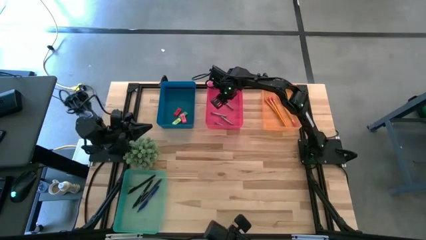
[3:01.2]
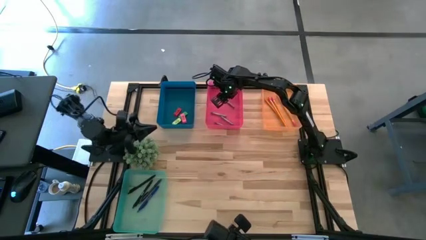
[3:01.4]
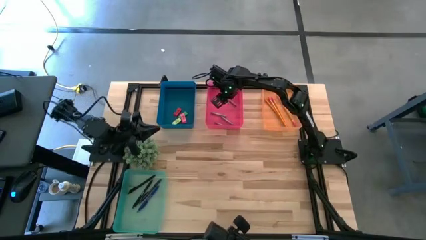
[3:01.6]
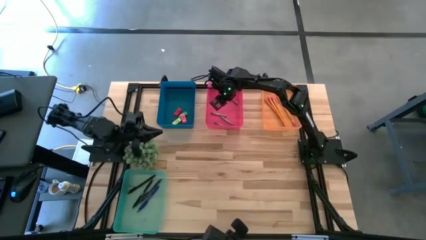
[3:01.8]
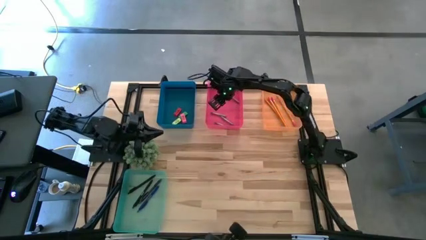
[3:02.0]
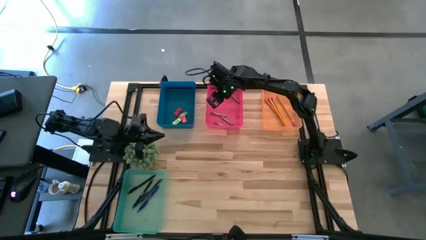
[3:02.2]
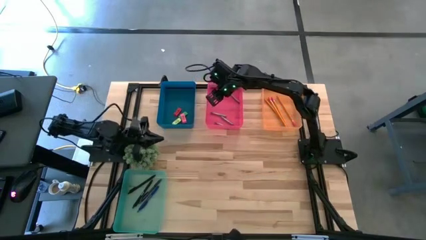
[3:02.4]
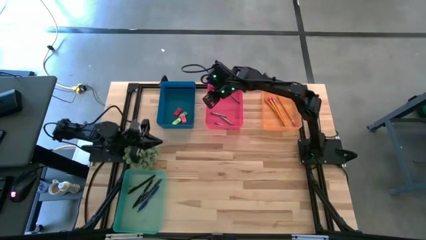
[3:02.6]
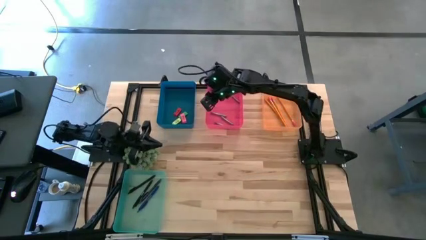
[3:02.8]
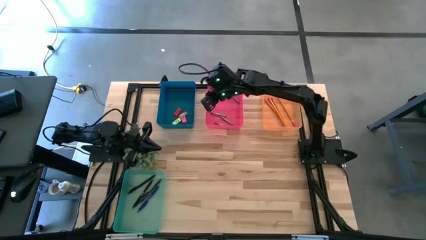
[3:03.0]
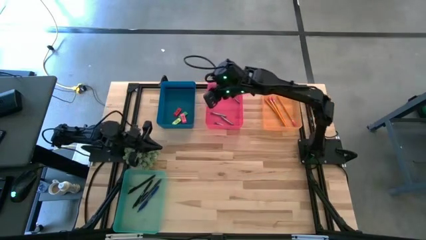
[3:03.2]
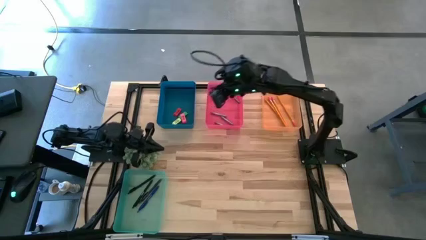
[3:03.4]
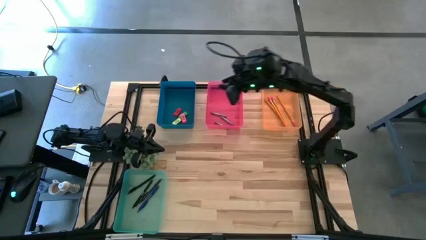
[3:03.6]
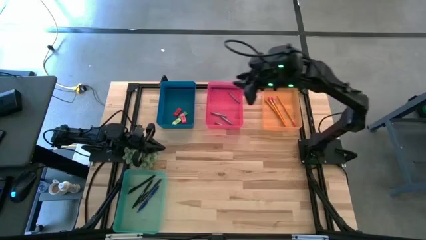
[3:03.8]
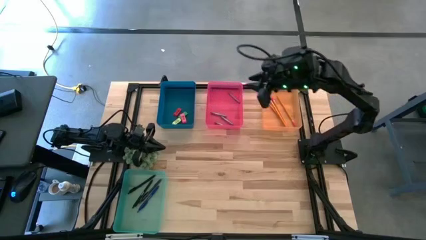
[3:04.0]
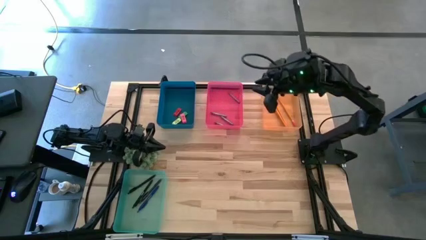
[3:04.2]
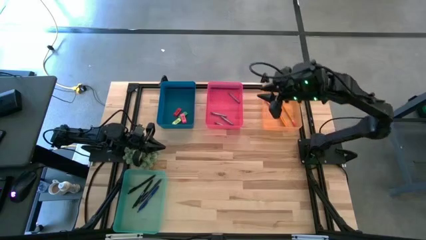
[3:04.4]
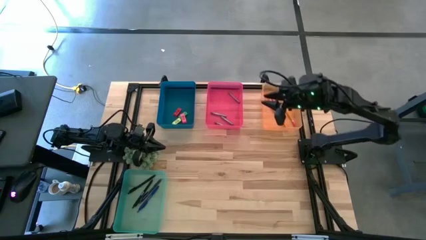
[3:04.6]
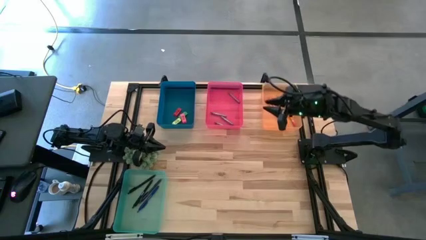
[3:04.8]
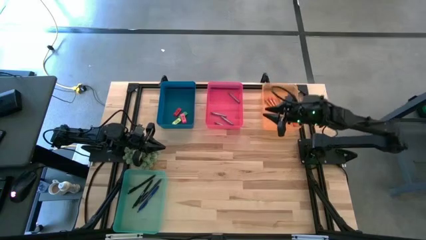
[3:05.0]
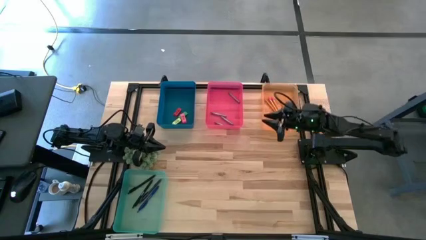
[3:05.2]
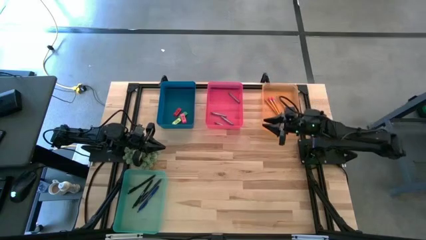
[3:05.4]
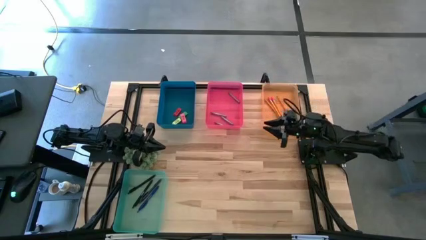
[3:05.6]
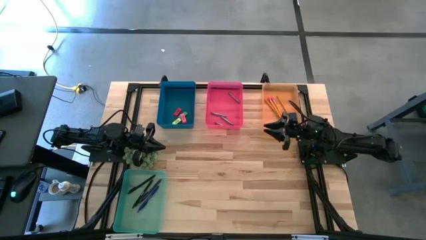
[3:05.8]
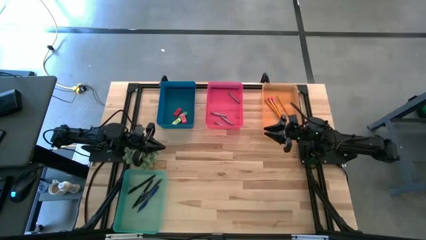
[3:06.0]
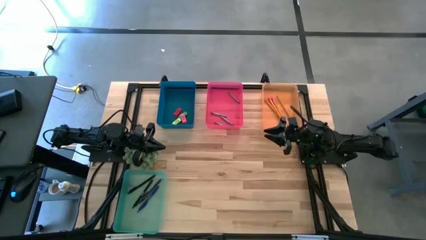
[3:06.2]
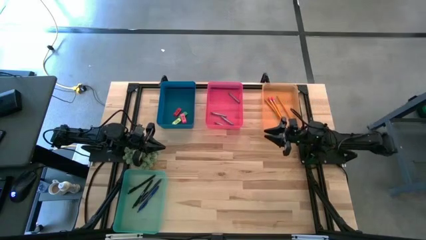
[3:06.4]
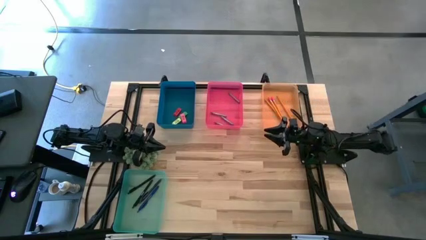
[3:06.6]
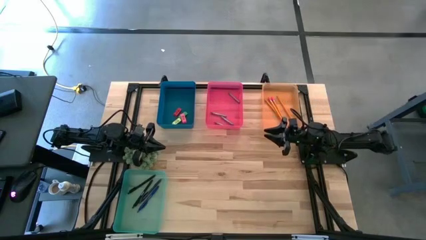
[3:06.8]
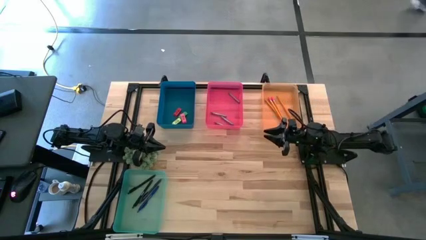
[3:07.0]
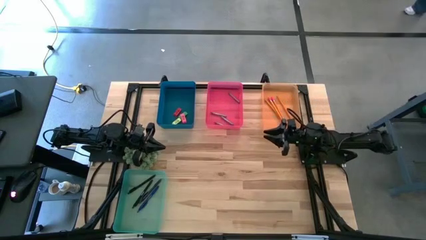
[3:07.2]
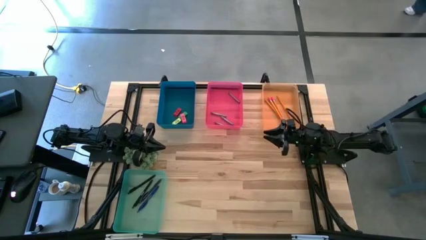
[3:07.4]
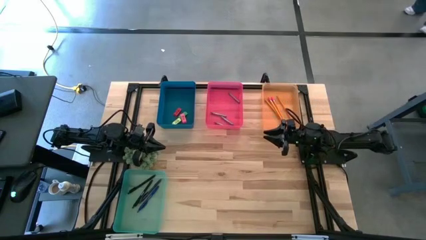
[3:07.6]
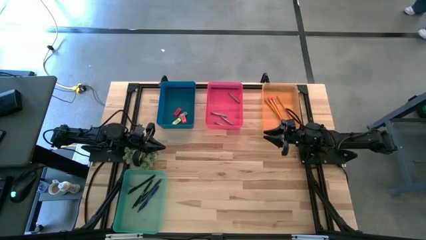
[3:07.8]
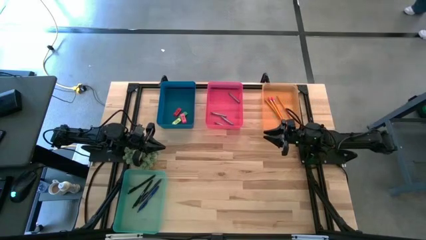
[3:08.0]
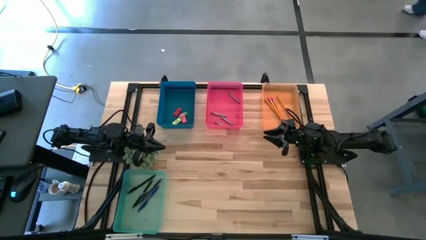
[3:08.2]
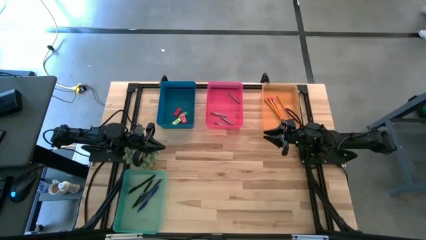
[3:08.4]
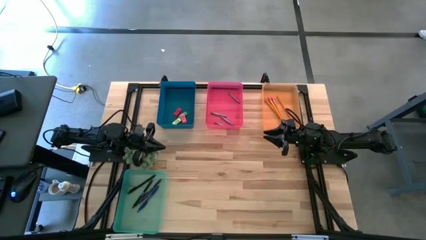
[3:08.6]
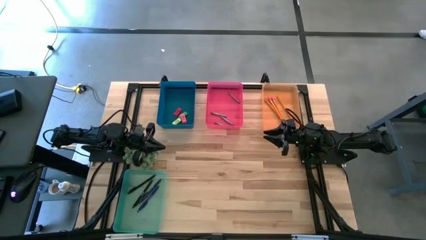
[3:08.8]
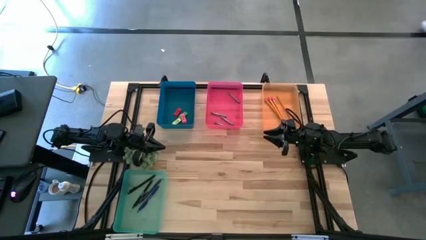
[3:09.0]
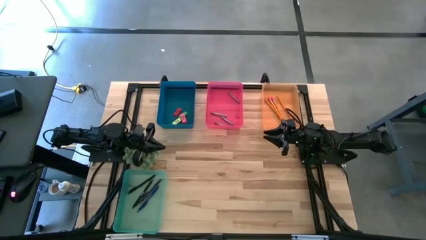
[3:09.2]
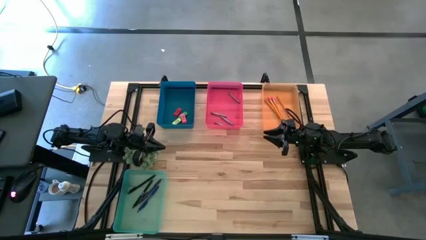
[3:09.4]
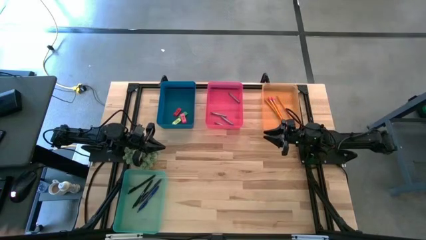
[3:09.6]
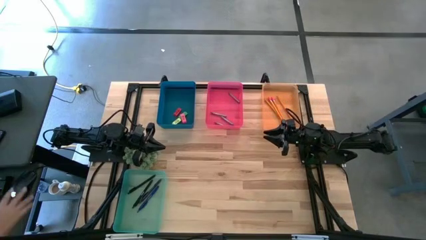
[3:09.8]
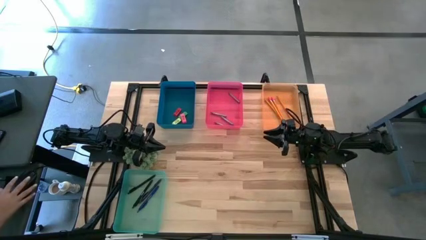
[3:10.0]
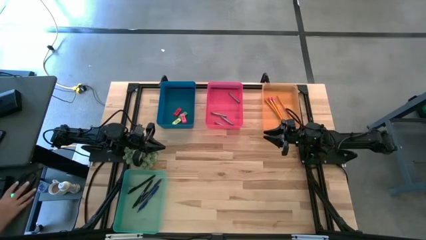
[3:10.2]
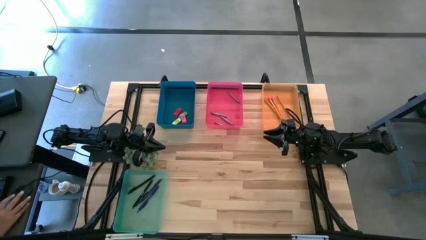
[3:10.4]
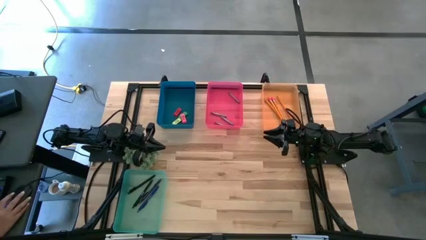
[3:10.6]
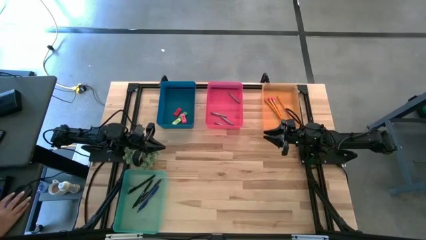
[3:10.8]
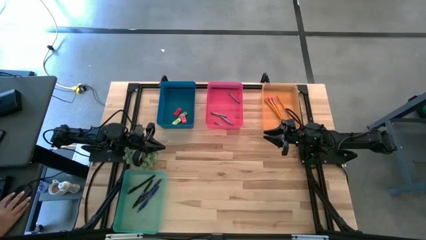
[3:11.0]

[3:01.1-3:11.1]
Task: Sort crayons/erasers/pens/pencils in bins
Return to Home Position

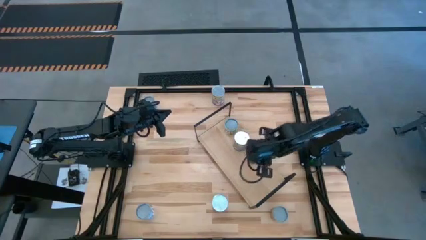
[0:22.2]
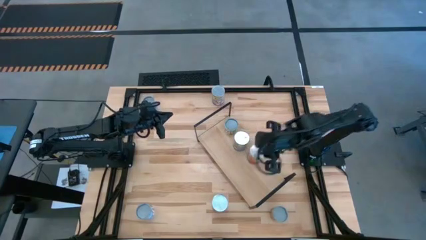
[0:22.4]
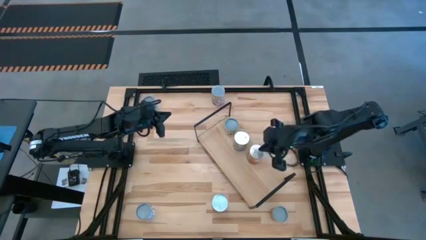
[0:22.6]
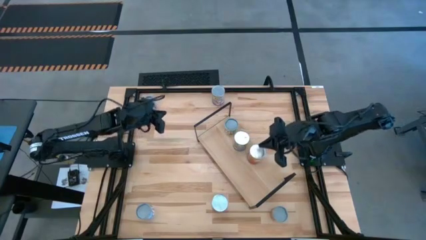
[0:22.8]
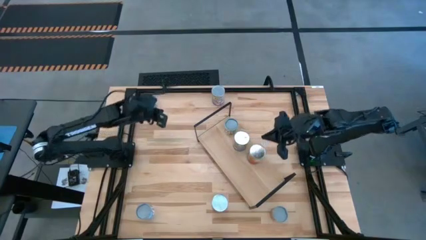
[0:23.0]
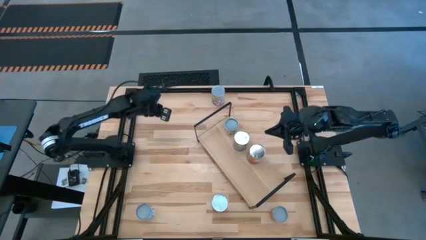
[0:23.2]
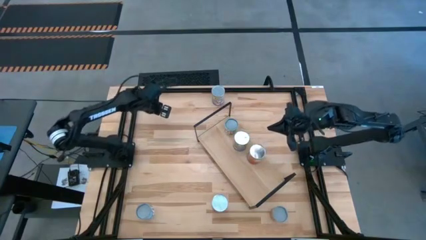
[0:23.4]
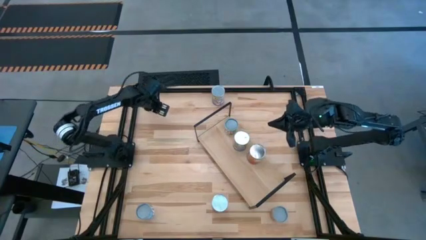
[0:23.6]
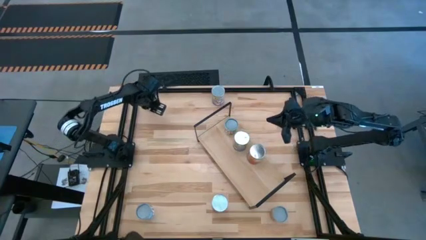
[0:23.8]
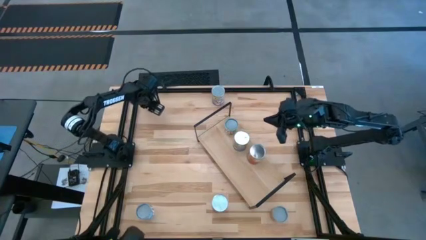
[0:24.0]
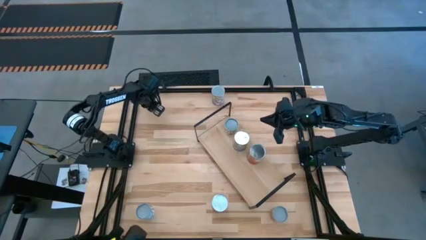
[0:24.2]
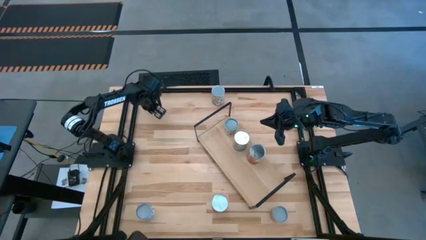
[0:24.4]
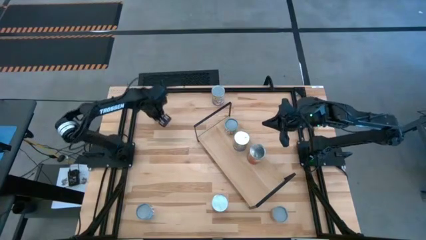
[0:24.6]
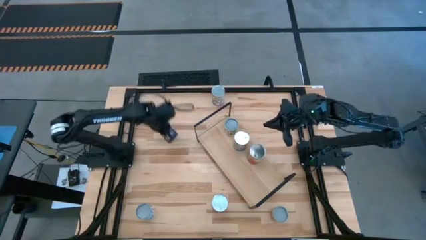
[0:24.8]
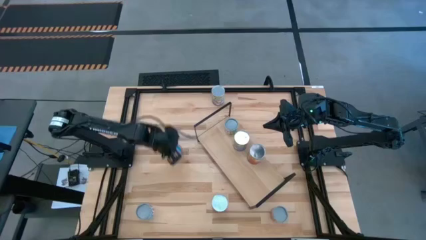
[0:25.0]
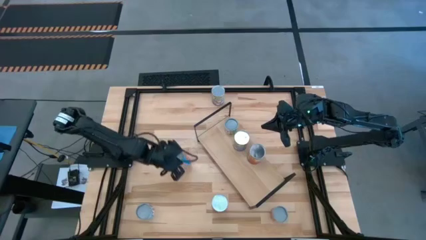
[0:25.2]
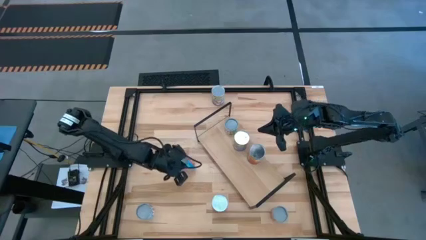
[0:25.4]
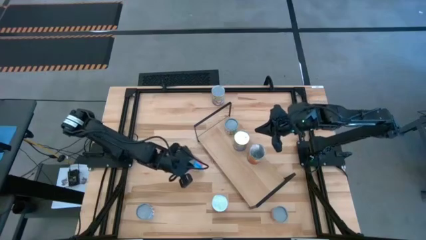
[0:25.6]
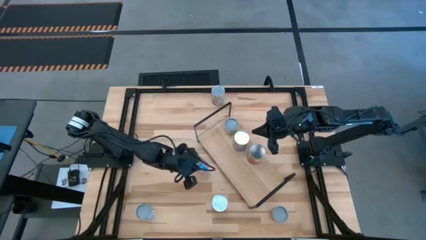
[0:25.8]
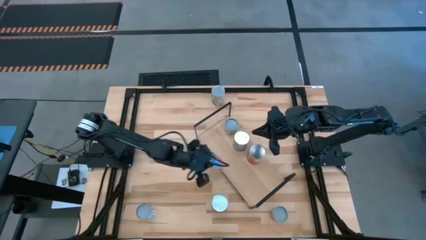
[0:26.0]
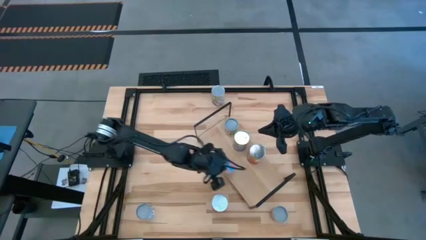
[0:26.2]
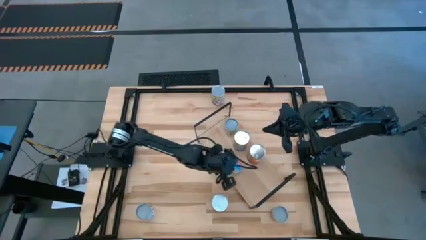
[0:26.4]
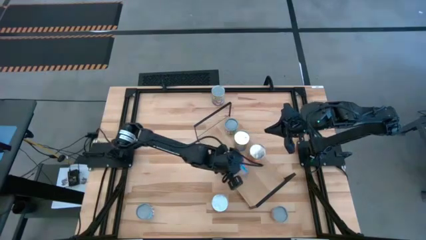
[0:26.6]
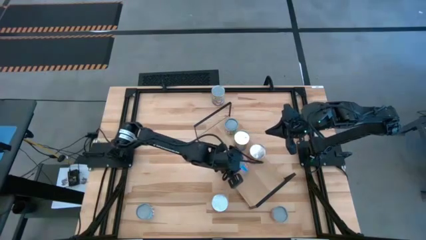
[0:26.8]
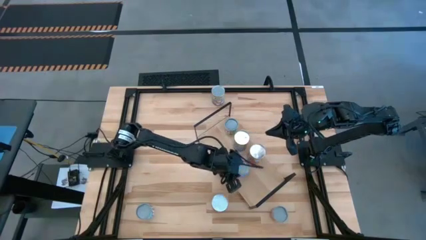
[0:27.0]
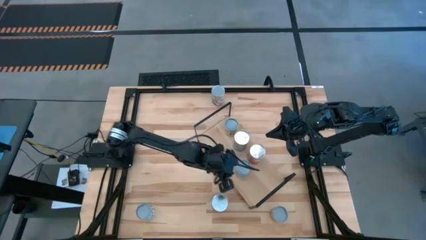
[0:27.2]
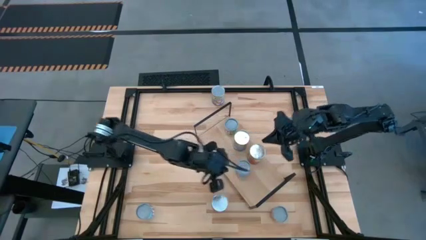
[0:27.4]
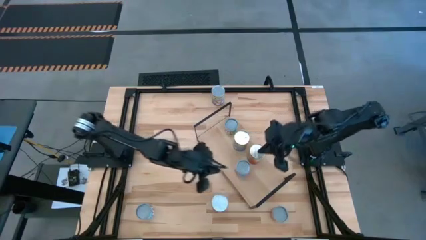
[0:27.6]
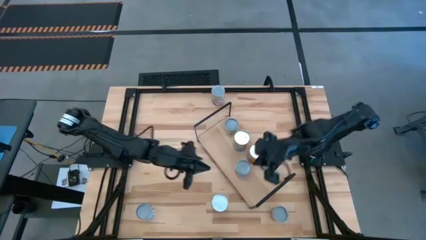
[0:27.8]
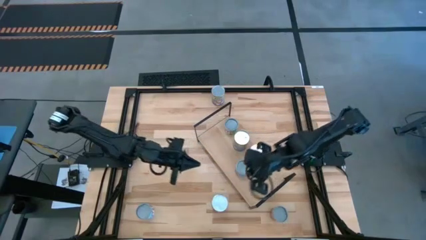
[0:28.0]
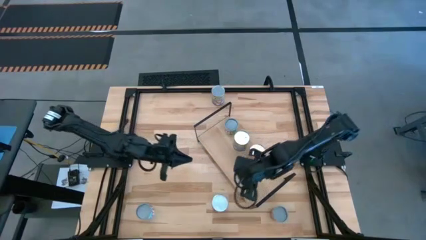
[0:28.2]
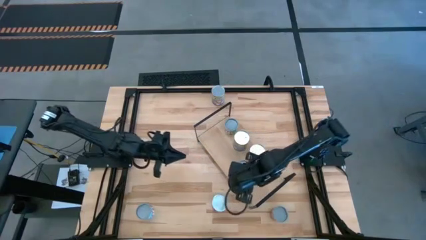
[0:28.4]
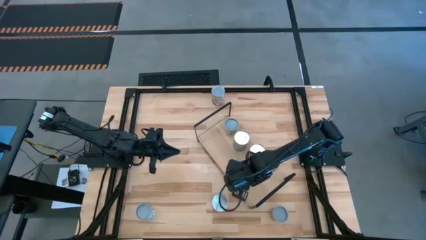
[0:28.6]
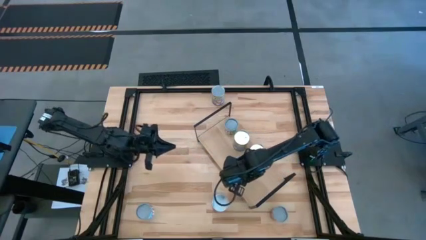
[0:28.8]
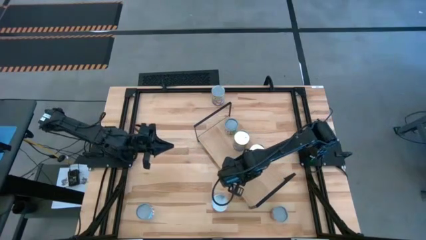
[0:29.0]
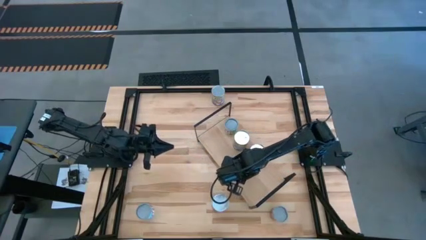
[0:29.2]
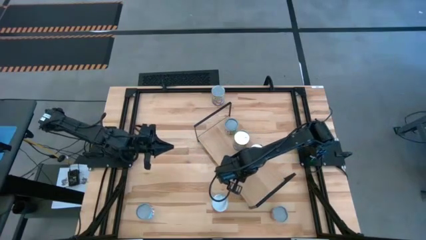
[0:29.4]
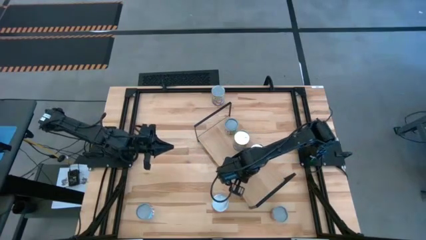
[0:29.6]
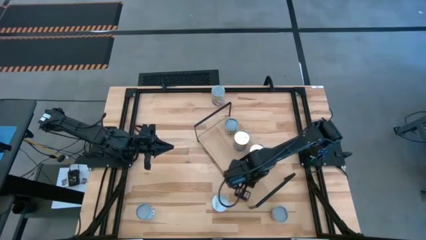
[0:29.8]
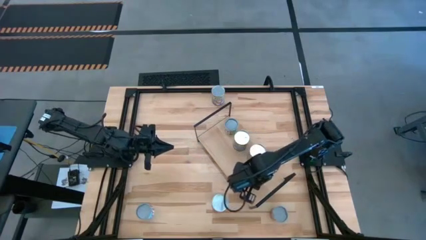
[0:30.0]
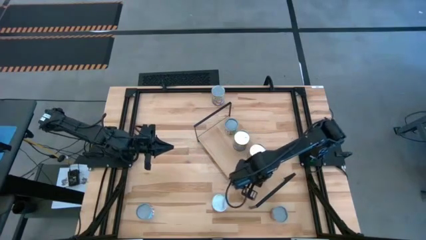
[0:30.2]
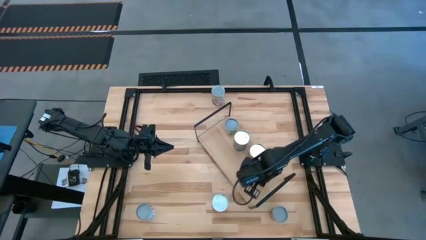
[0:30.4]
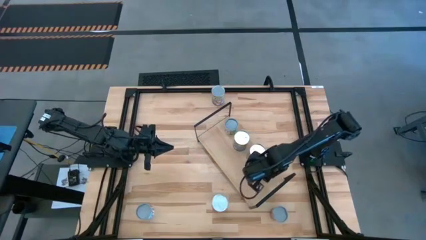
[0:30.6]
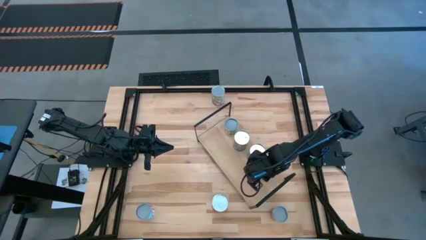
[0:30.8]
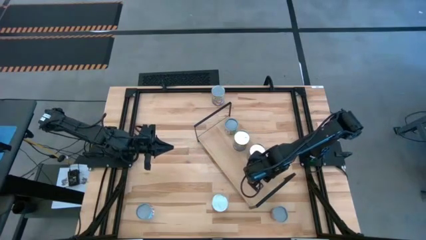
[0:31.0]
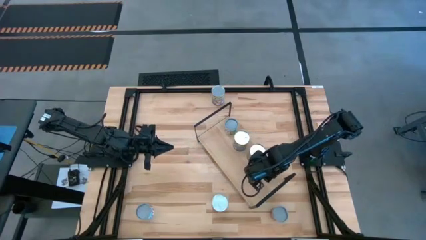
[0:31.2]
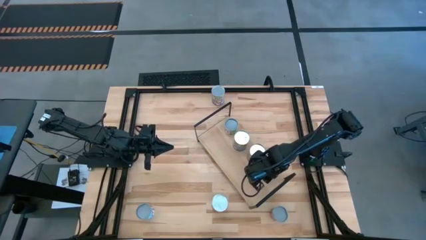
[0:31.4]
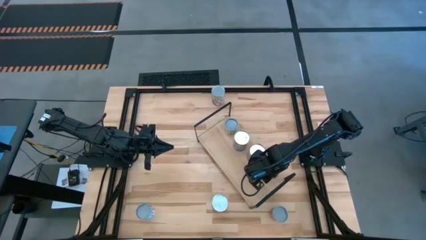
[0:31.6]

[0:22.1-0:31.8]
Task: Pick and place cans onto a shelf
Put the canned mixed vegetables on the shelf
